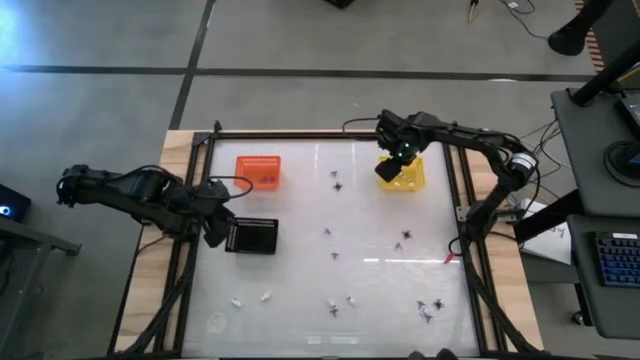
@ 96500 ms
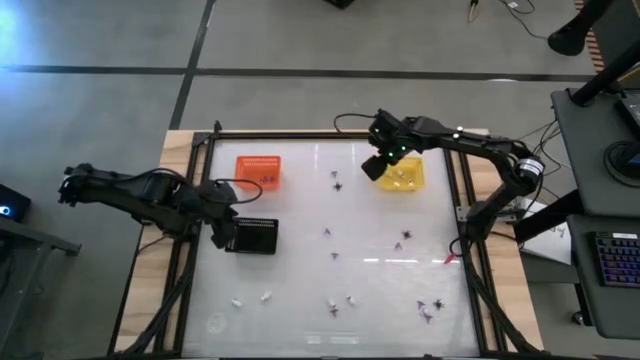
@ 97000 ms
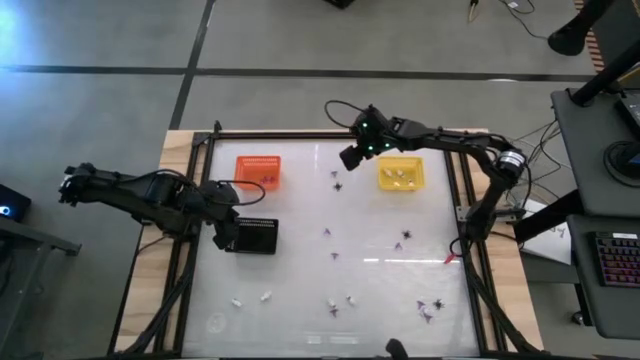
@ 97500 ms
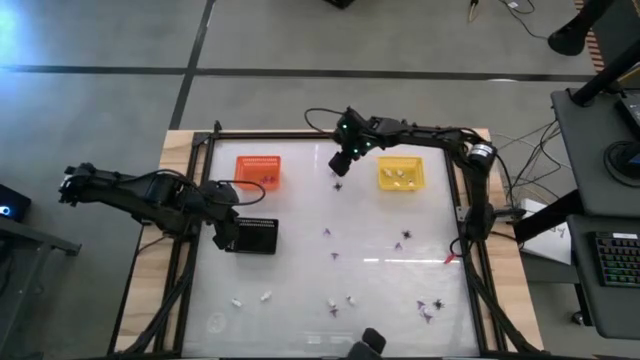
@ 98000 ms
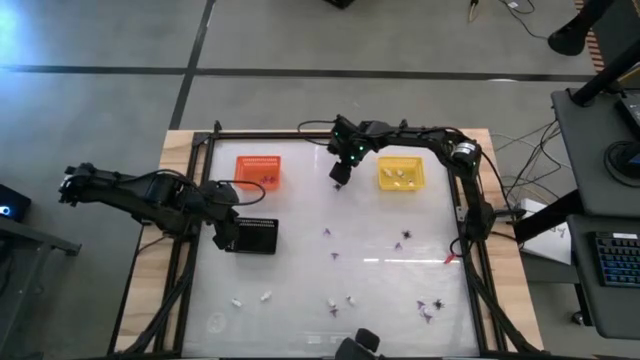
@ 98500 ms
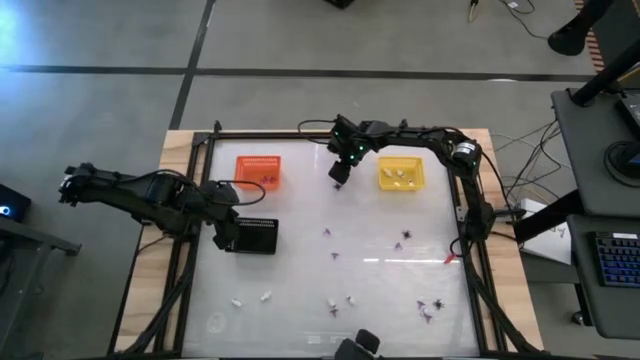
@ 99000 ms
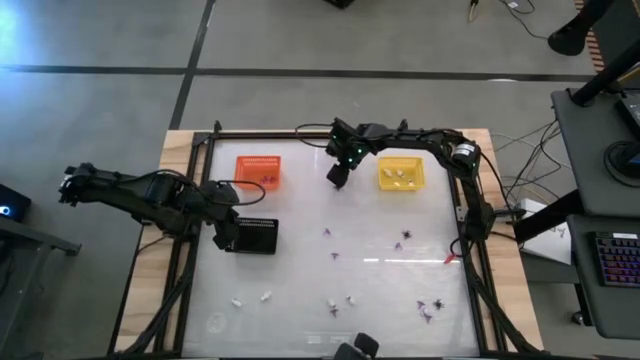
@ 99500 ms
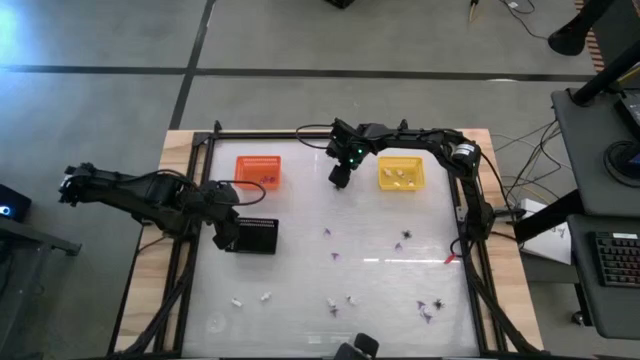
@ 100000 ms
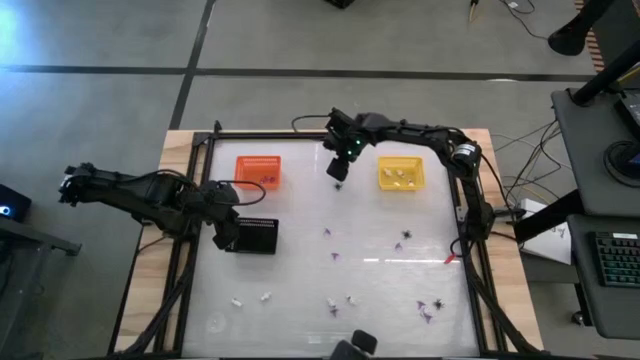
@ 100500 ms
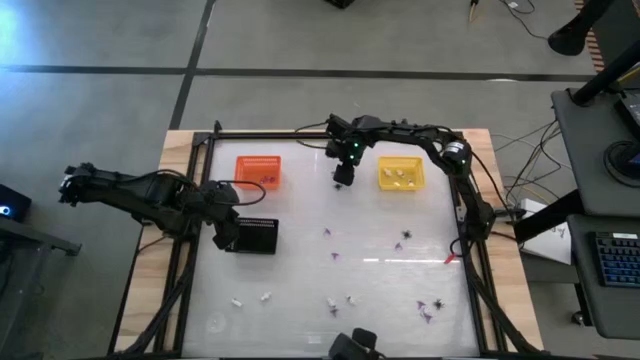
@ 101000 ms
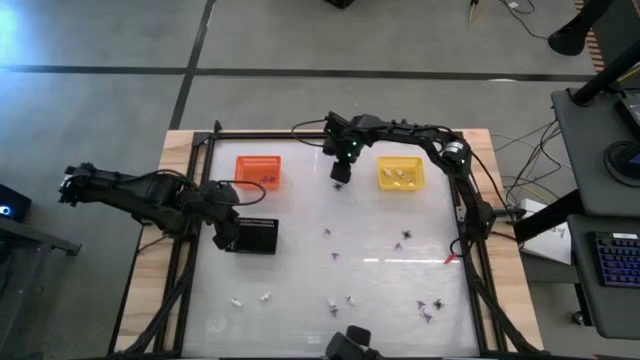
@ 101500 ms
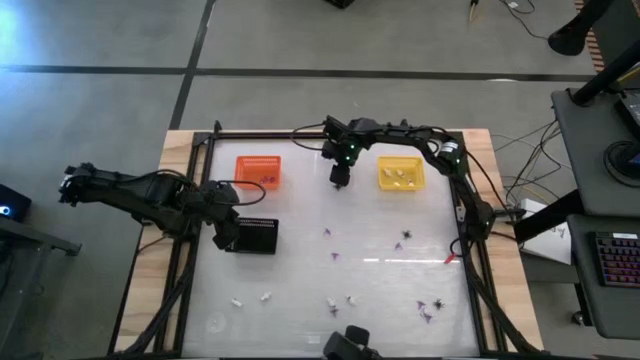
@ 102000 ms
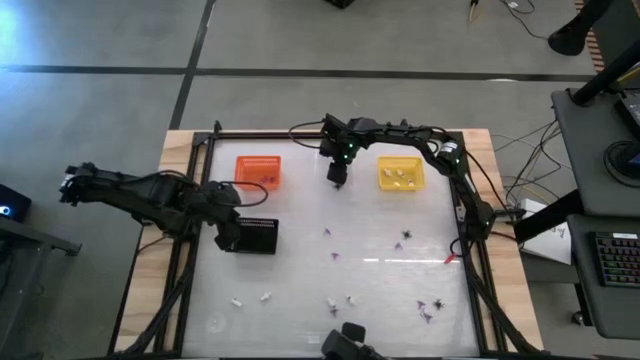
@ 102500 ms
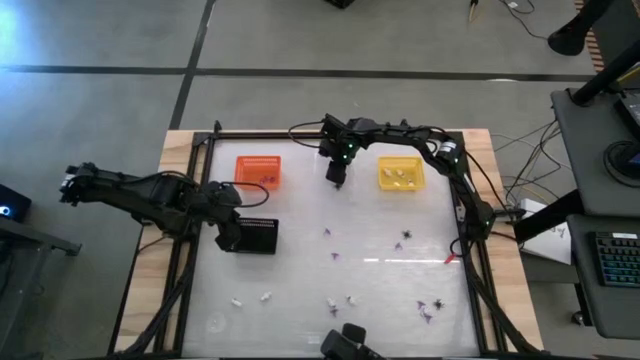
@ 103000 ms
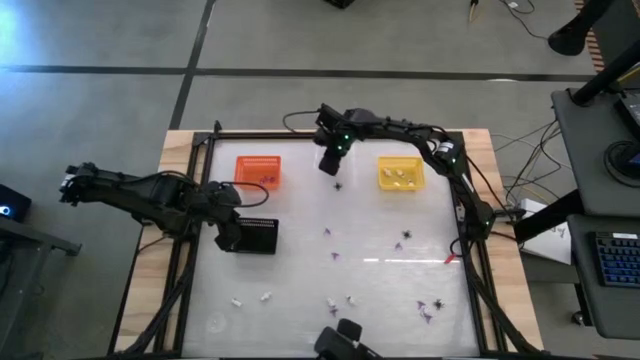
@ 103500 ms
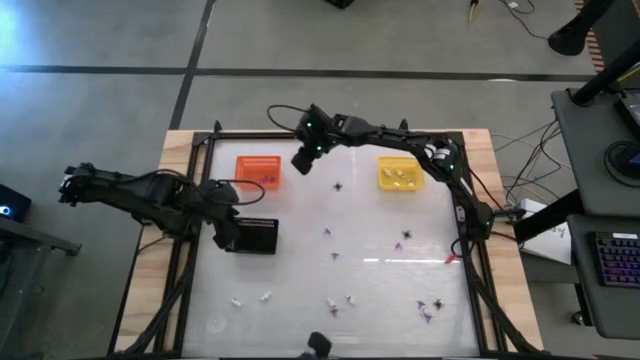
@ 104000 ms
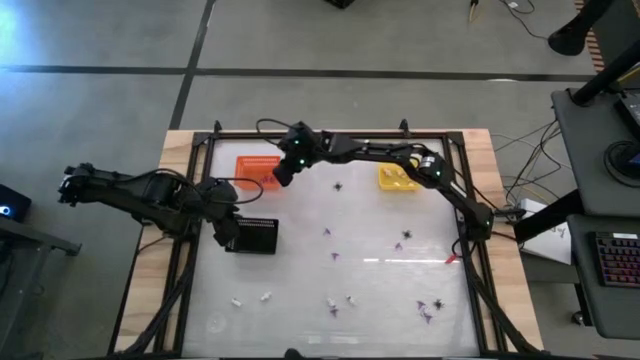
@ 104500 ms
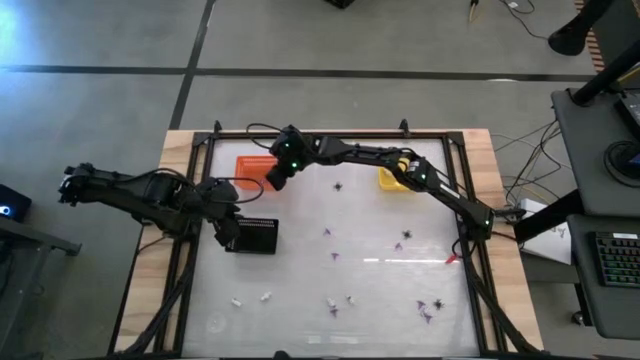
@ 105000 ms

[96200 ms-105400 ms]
Task: Sort Halloween decoration
Put the violet witch hat into the orange bin

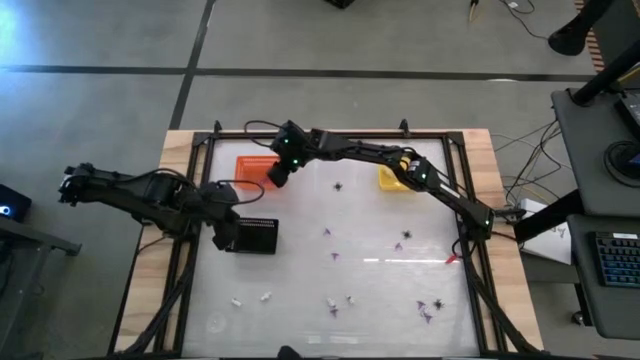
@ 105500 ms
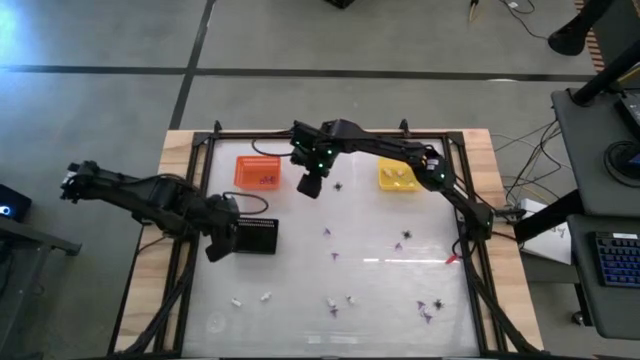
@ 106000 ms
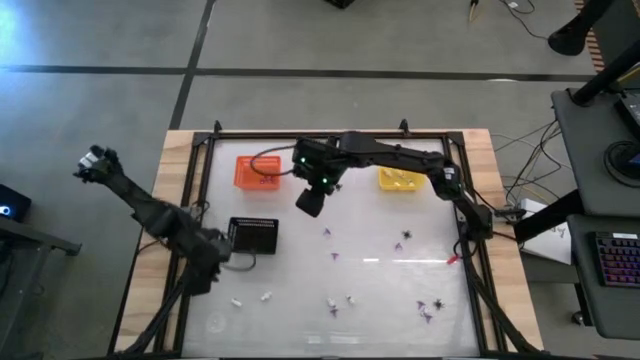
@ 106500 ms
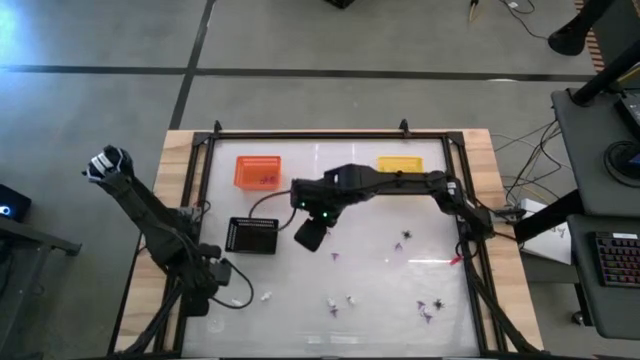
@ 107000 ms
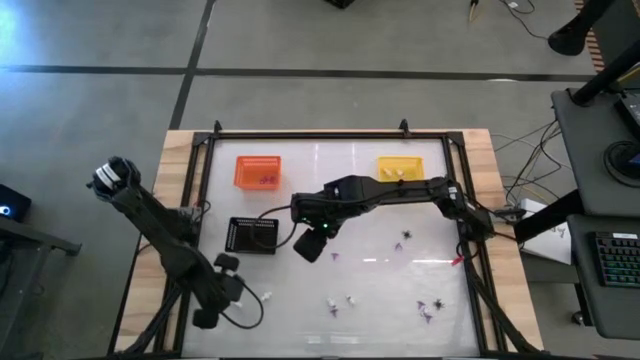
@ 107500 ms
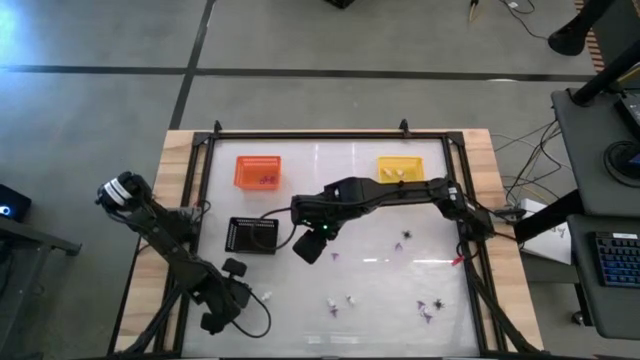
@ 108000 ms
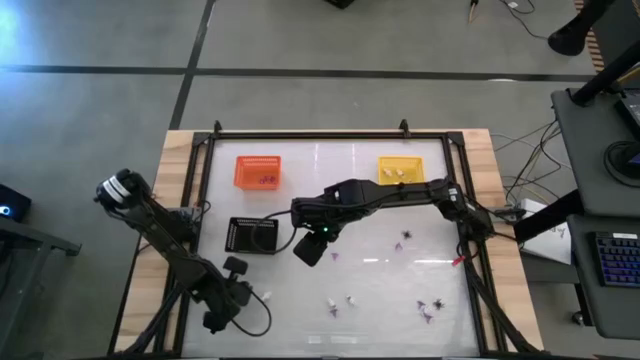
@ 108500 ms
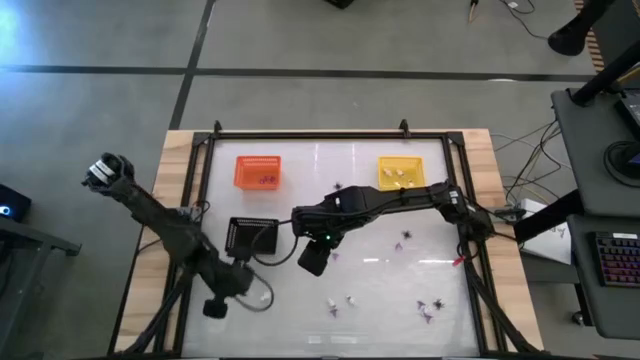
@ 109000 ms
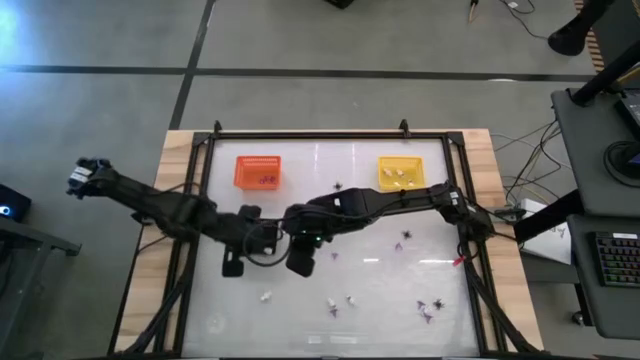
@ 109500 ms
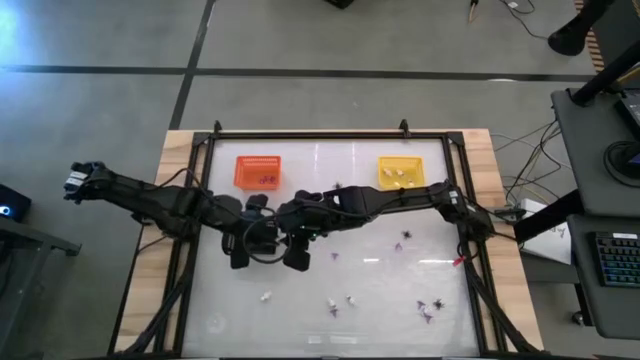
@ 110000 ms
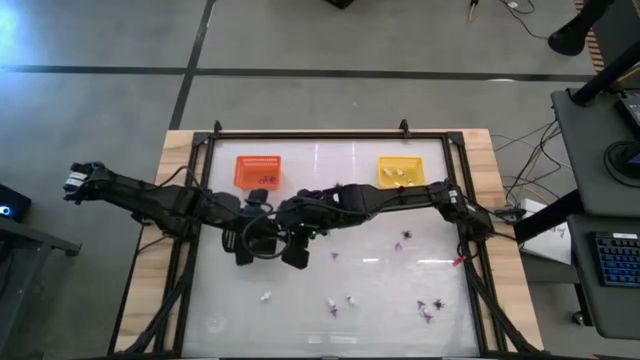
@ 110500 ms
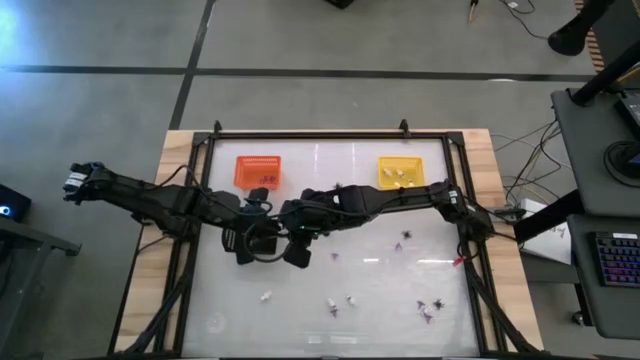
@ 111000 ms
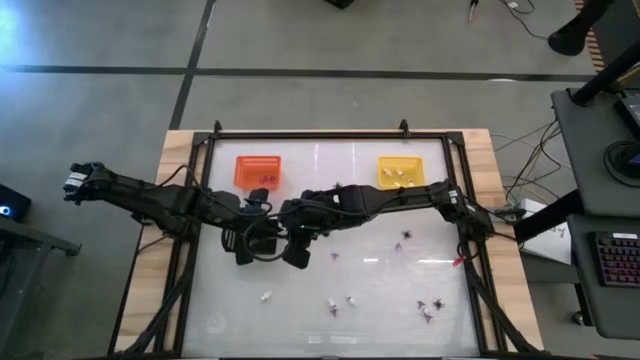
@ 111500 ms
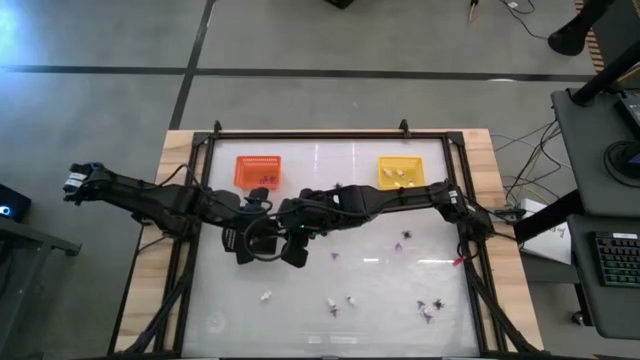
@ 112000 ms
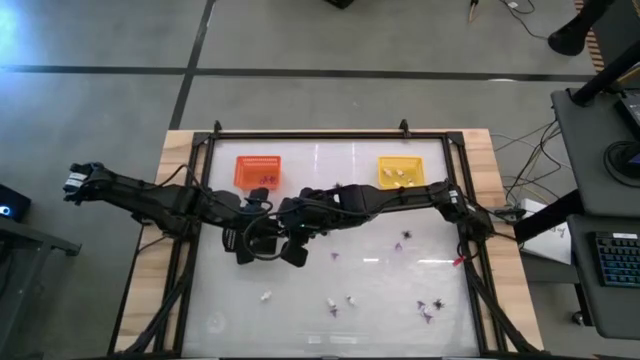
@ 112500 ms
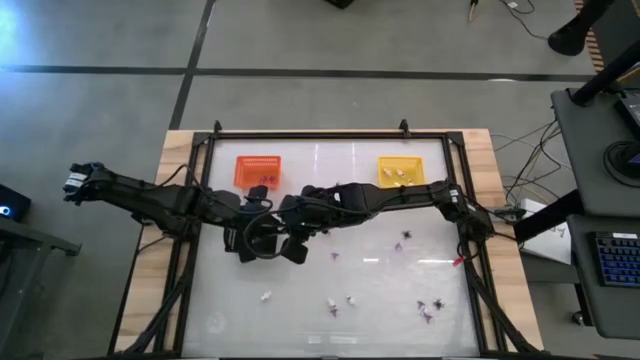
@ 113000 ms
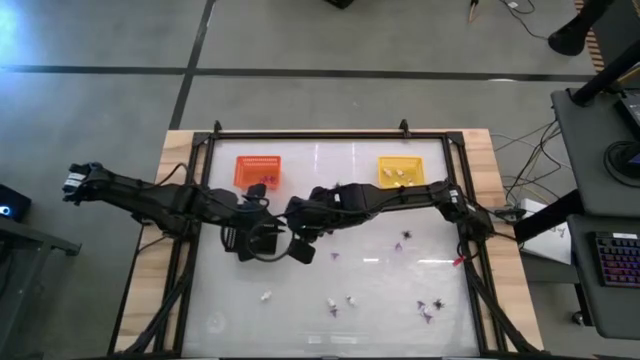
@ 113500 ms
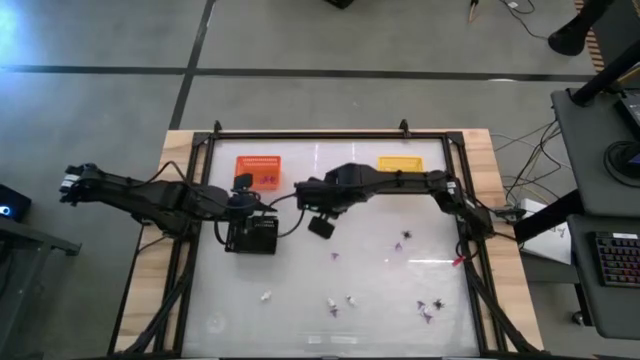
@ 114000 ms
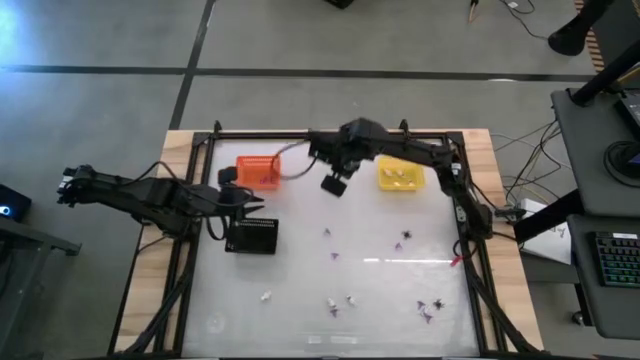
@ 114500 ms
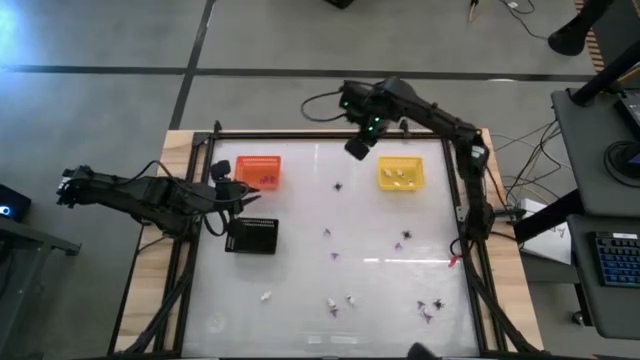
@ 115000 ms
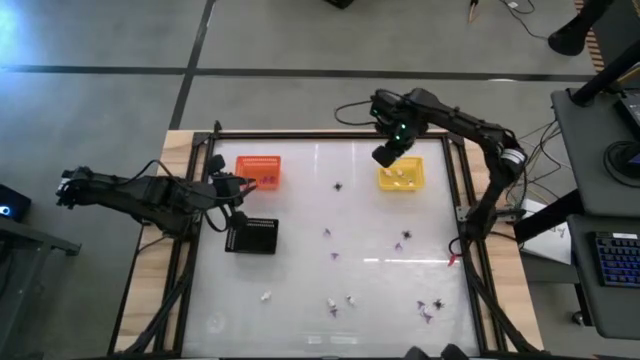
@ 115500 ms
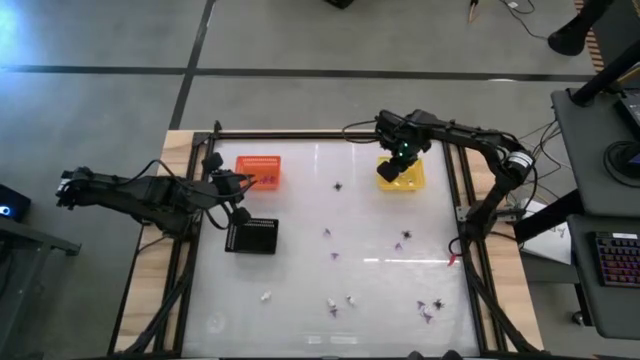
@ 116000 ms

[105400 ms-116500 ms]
Put the white skeleton toy into the yellow bin
